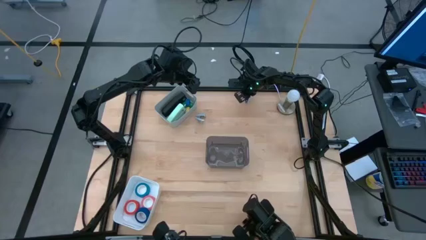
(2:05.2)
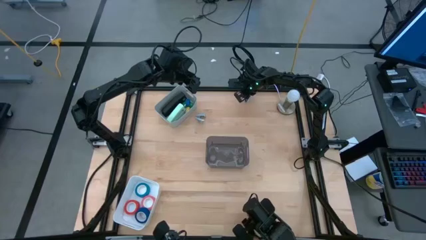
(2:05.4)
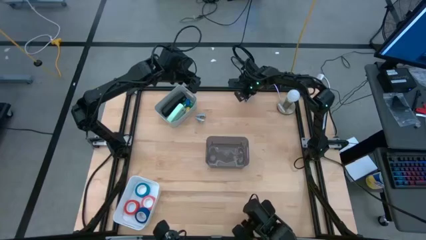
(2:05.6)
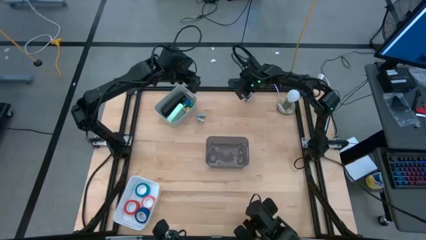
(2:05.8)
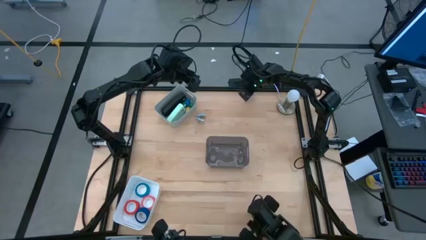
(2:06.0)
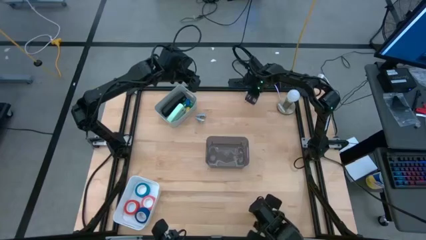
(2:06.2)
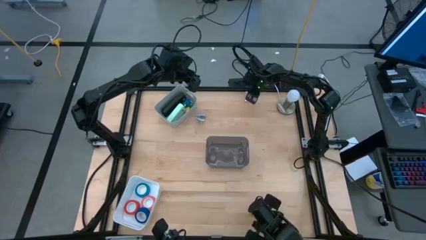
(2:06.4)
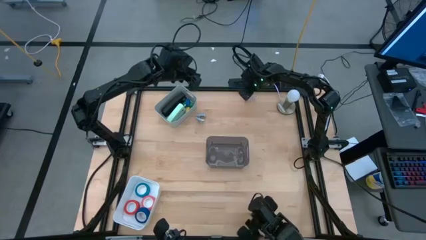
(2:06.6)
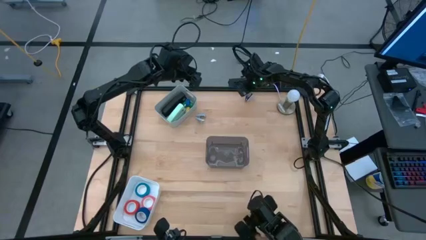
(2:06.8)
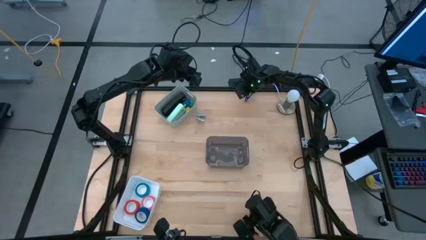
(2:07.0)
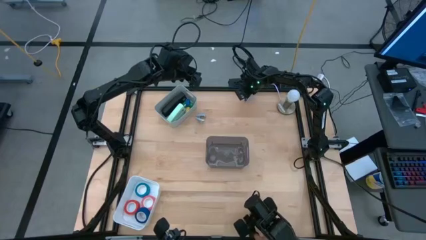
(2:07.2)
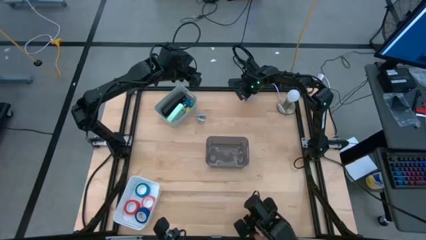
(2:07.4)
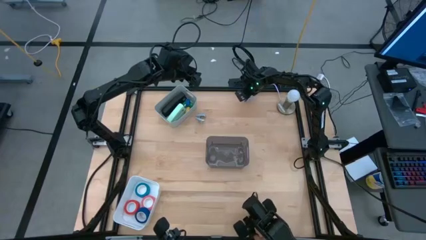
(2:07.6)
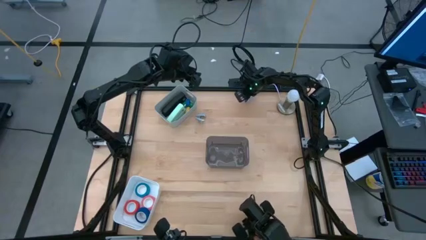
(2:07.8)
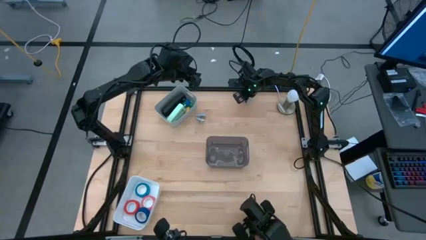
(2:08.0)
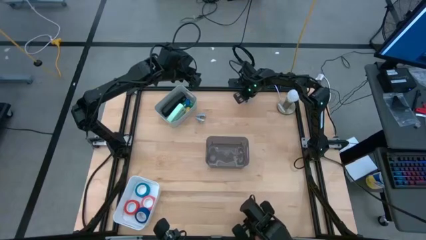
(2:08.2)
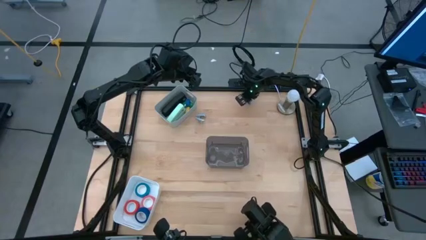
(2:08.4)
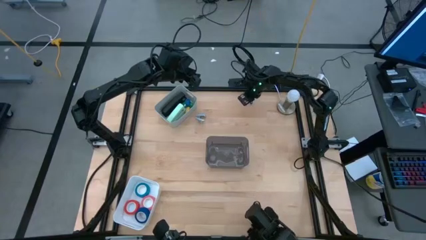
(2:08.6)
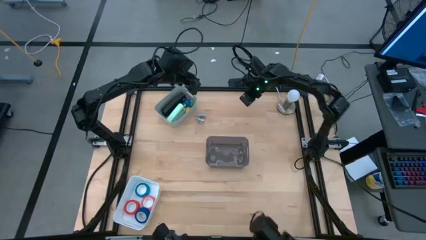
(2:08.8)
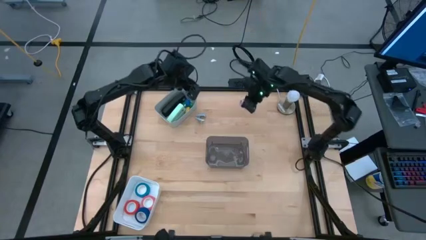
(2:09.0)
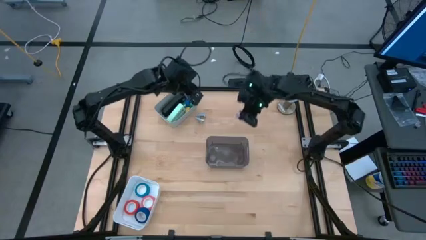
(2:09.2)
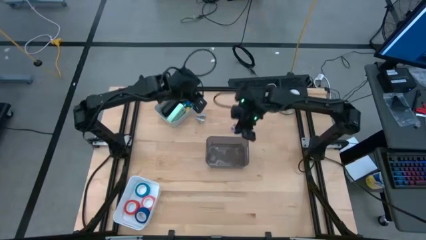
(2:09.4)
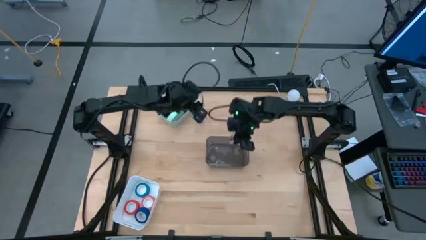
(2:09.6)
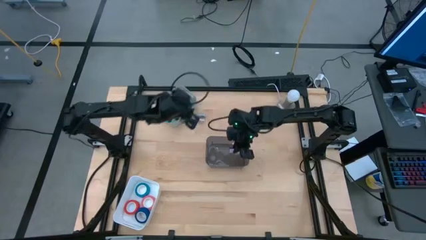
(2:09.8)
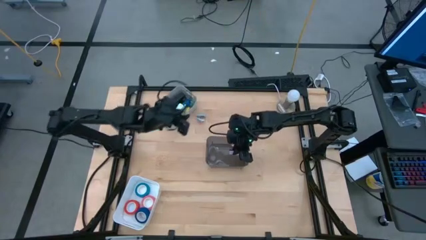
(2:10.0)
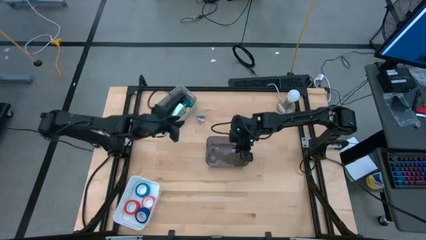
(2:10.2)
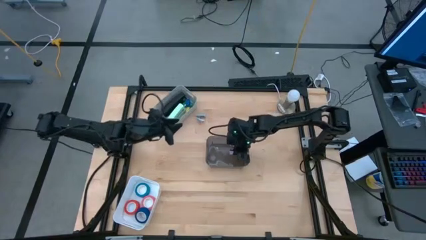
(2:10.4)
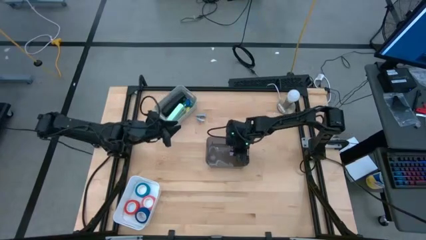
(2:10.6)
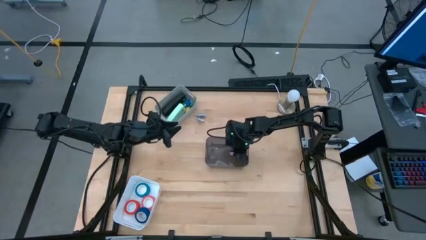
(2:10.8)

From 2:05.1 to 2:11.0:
Task: Pick and place Stapler, Stapler remover, tape
Put the purple staple remover into the black bin

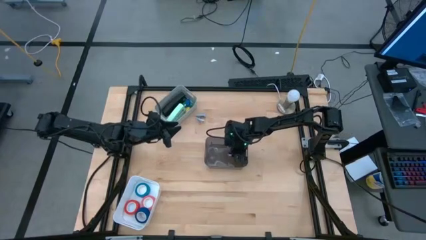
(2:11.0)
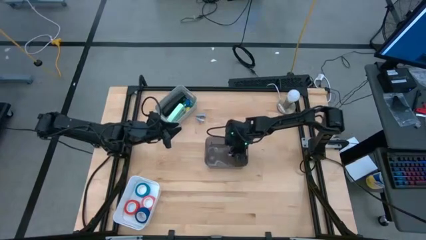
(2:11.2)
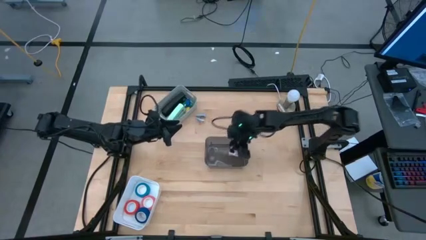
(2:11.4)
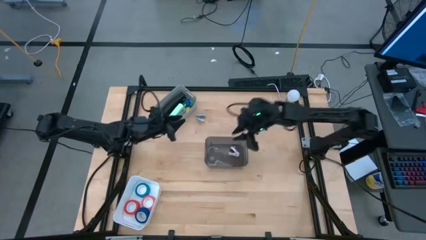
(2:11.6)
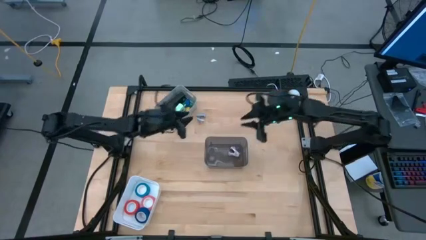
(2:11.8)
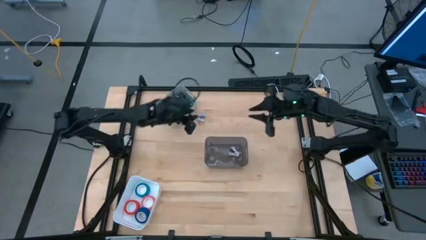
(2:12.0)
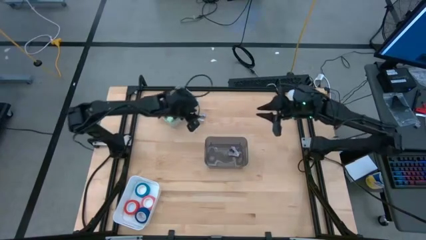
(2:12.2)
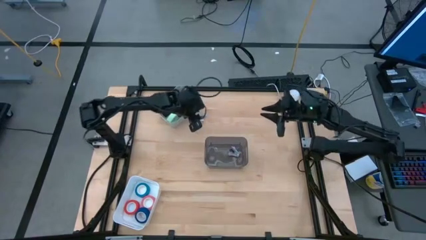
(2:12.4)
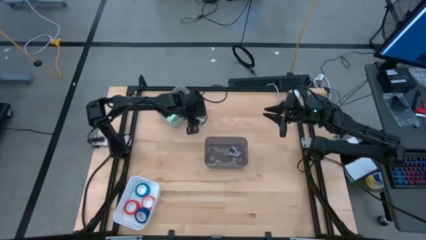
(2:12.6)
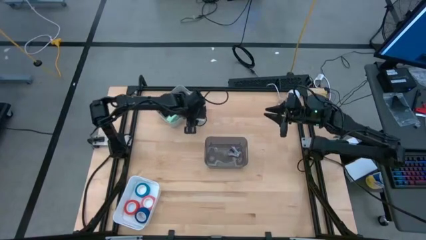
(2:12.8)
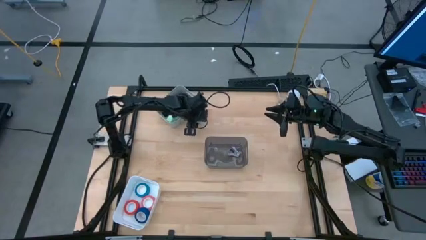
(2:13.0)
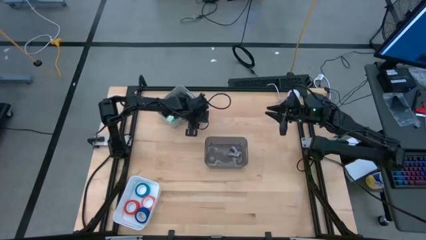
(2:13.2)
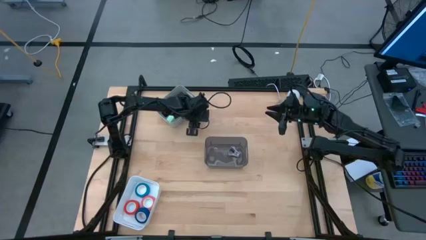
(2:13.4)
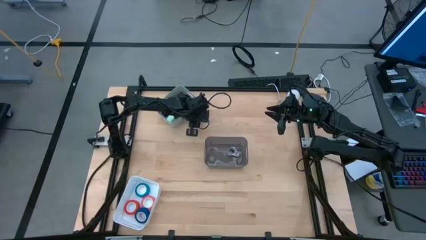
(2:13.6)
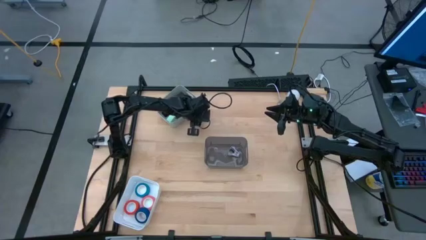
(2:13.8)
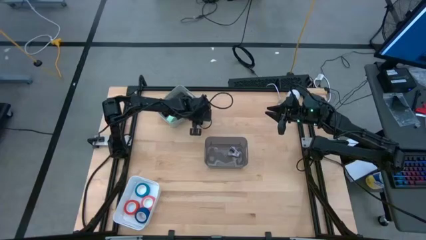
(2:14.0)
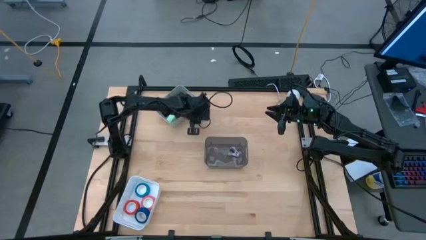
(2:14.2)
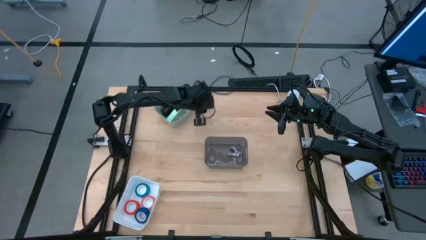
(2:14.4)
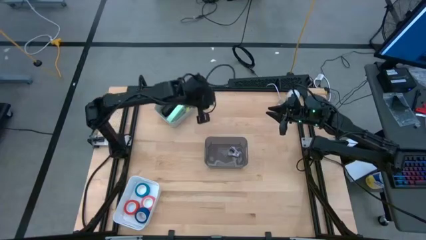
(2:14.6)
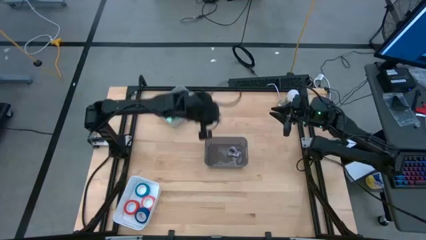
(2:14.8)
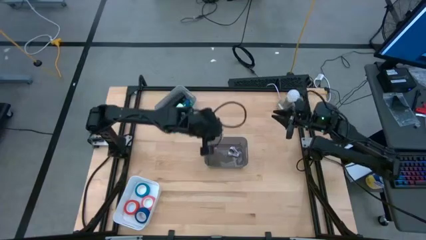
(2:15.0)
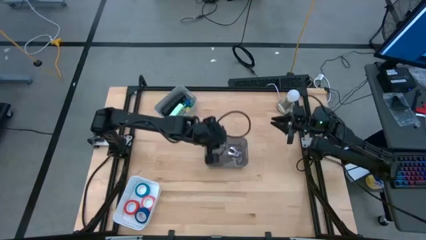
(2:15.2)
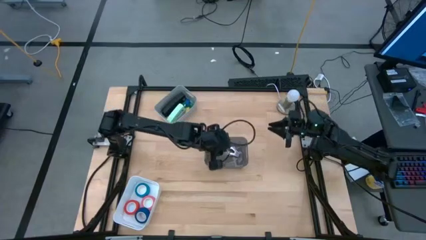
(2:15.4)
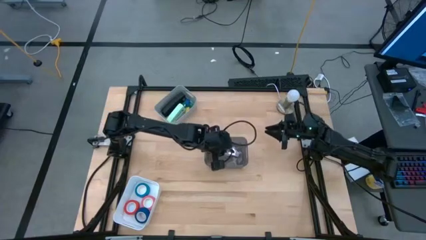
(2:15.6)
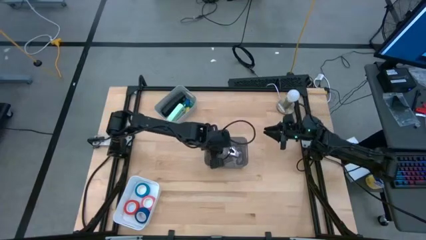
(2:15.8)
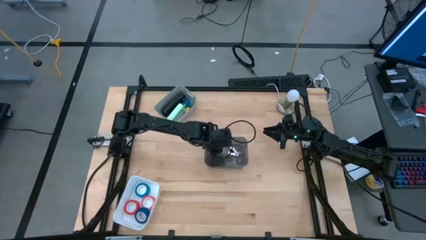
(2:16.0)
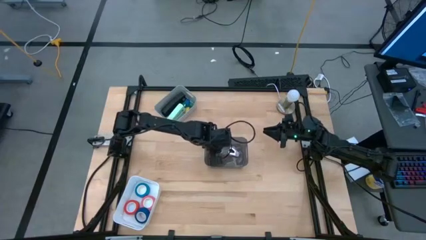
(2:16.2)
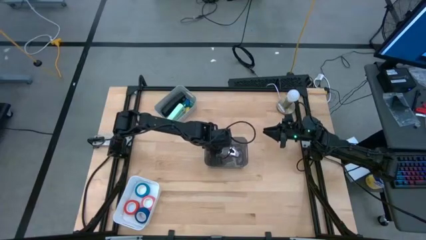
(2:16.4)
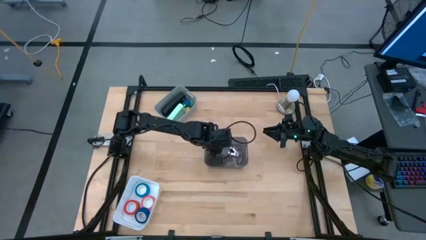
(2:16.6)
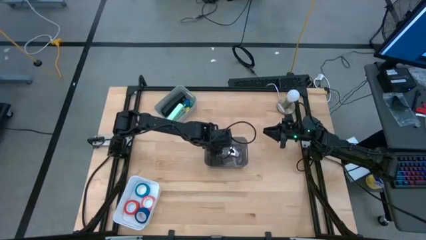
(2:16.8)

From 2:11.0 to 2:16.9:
Put the light blue staple remover into the black bin

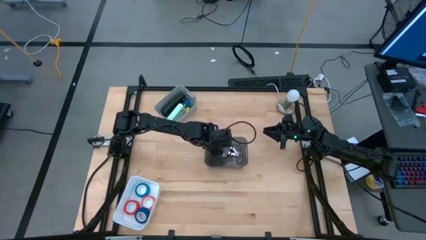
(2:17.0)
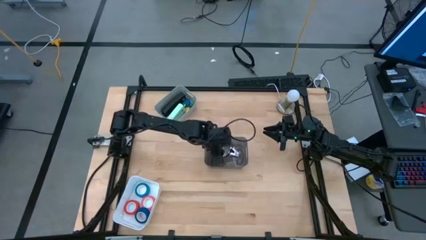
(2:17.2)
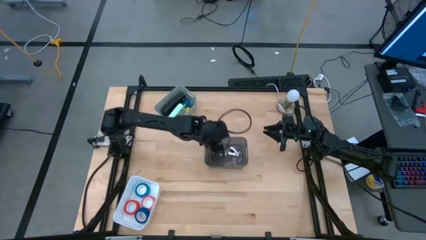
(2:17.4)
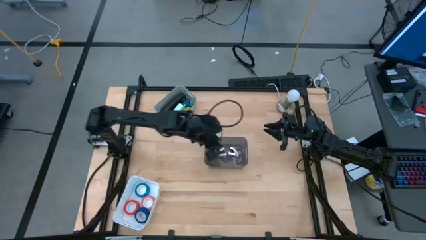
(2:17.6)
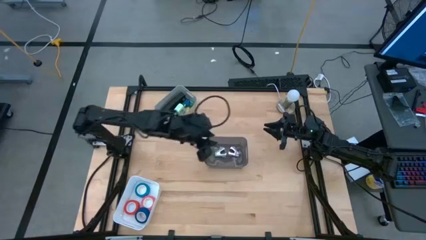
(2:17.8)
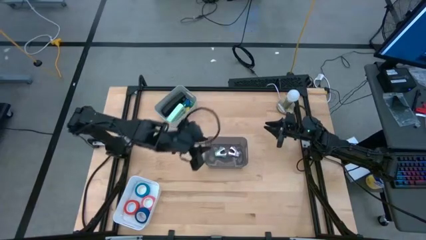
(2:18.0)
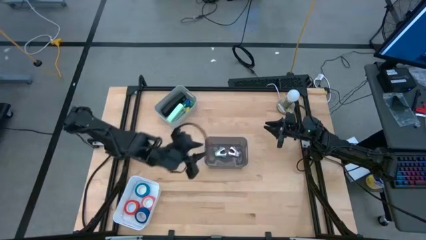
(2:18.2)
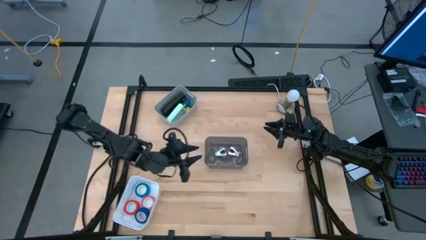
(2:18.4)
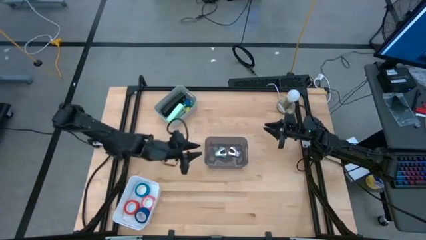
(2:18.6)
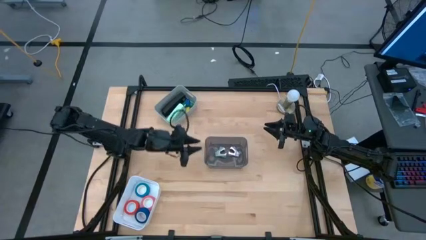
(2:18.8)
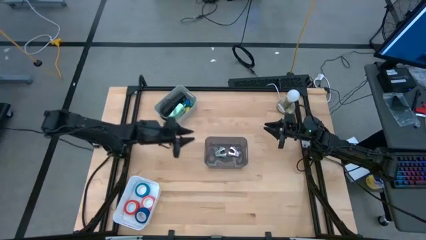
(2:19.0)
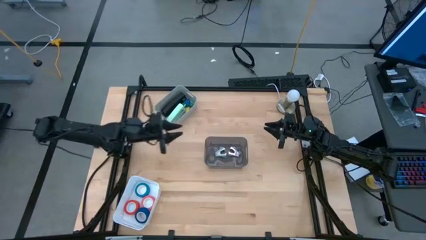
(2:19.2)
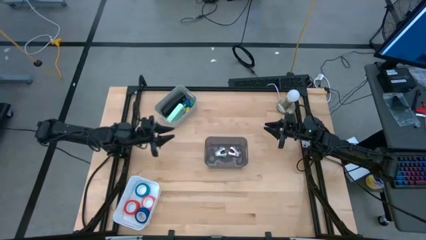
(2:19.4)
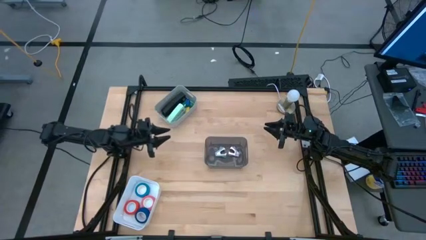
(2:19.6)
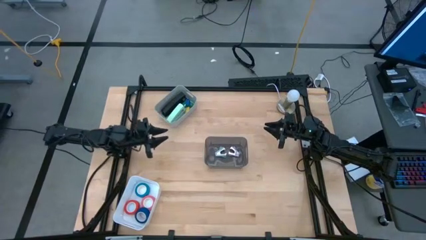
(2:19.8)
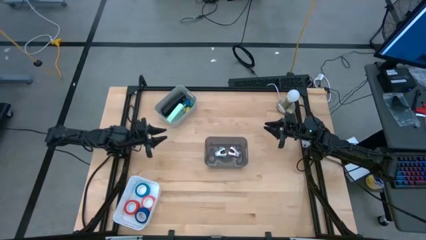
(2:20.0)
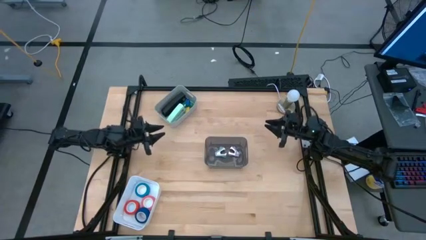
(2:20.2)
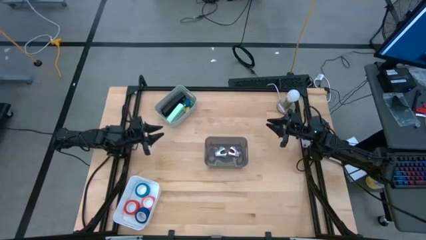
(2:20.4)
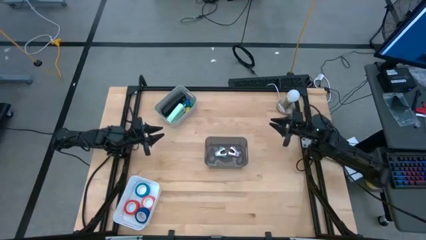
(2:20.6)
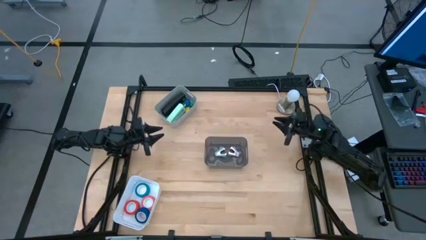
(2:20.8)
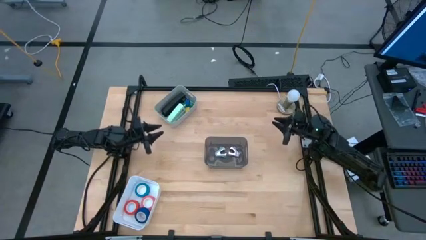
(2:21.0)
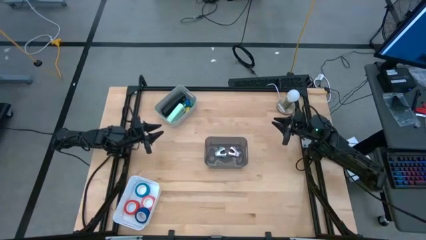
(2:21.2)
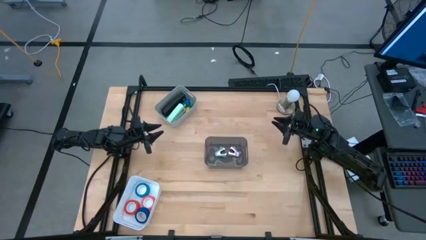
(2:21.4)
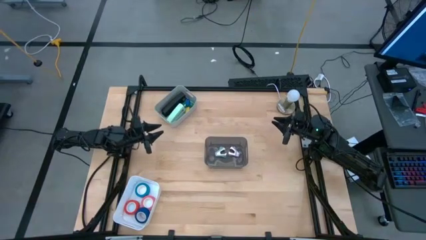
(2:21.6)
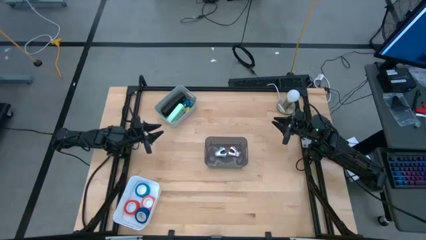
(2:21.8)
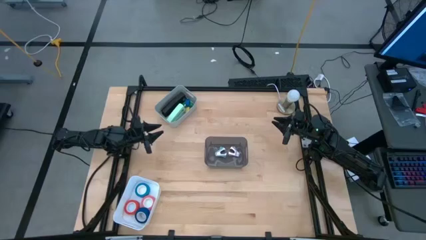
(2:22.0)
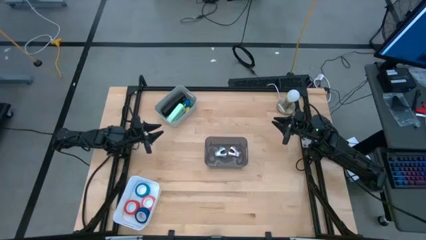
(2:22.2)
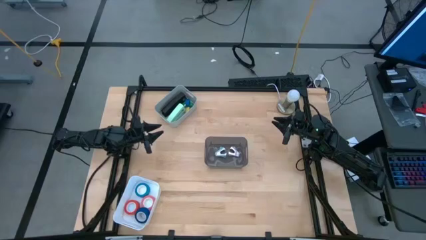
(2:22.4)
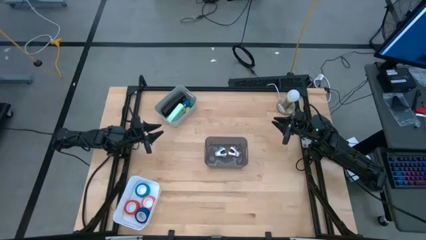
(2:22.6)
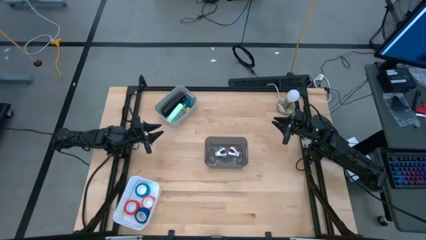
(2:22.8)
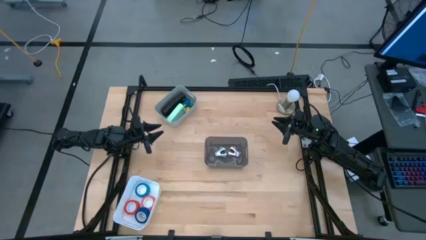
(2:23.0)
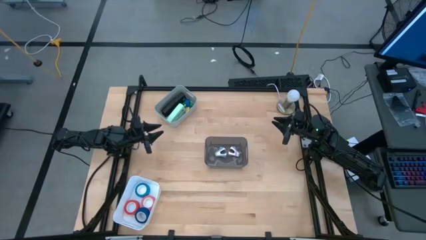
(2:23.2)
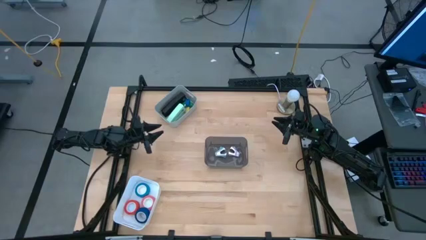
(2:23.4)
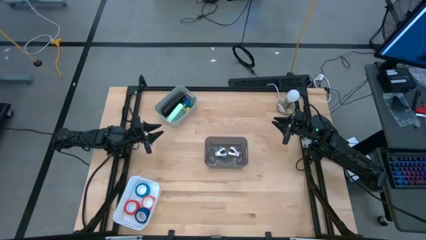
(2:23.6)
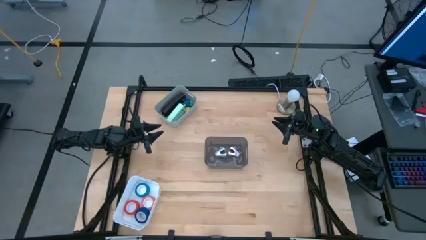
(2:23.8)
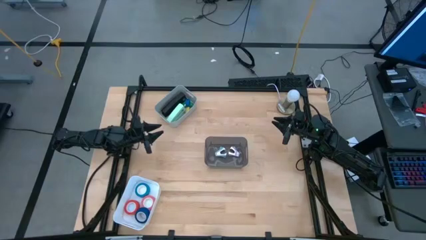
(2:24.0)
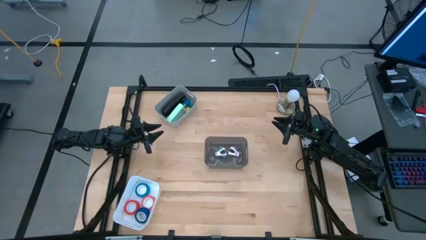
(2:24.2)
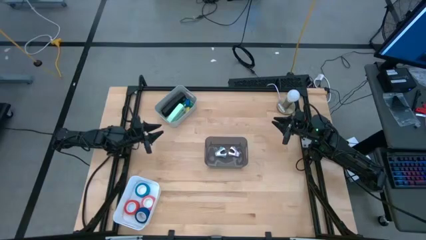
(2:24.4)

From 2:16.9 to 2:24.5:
Return to Home Position
